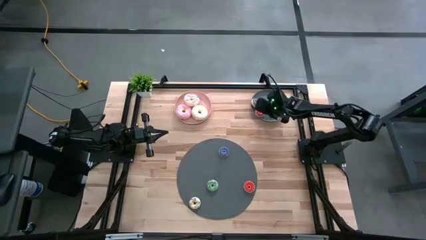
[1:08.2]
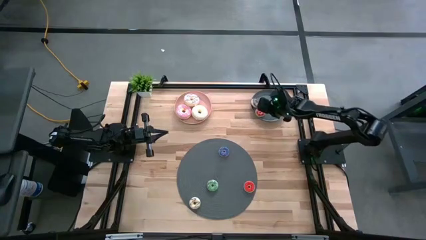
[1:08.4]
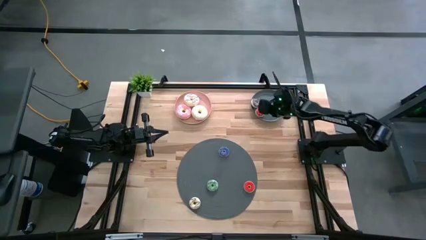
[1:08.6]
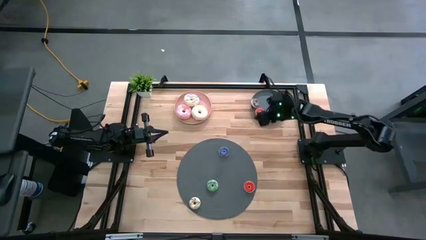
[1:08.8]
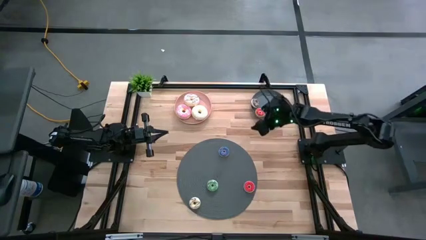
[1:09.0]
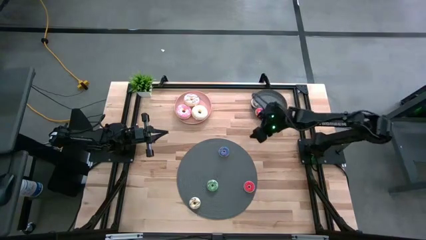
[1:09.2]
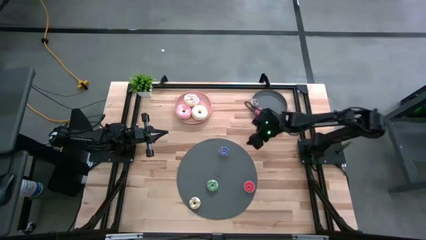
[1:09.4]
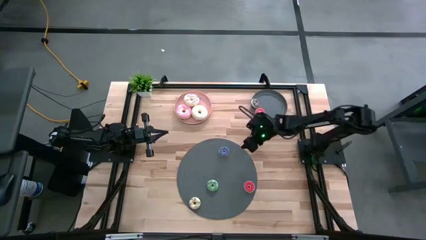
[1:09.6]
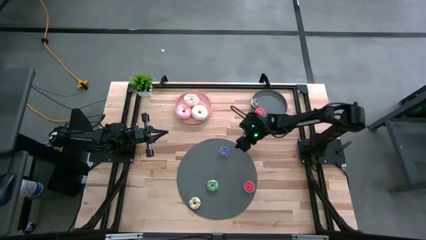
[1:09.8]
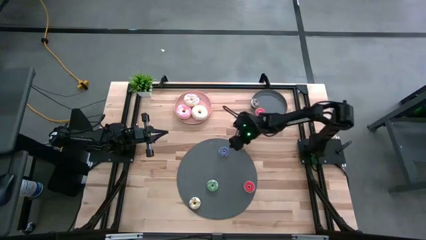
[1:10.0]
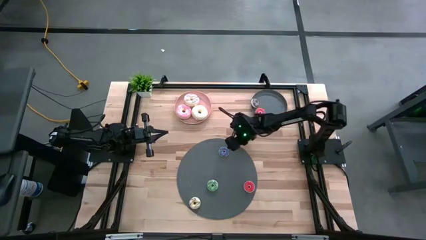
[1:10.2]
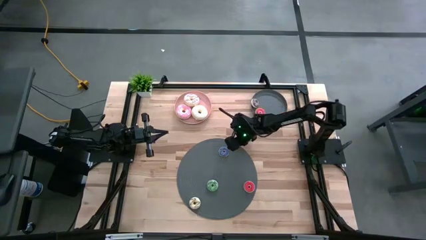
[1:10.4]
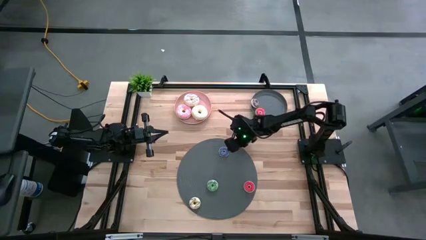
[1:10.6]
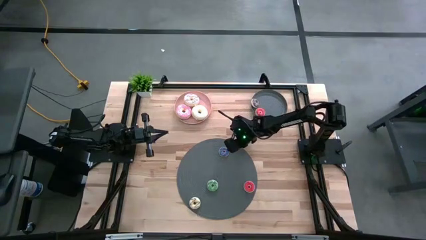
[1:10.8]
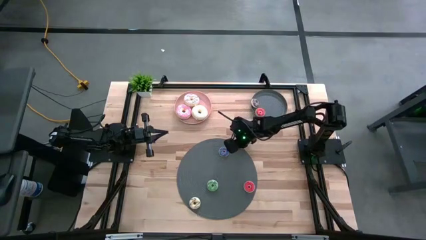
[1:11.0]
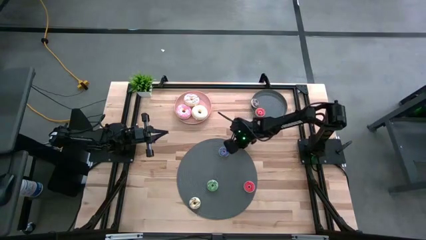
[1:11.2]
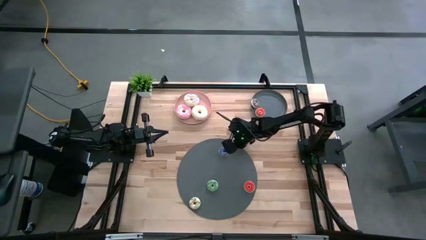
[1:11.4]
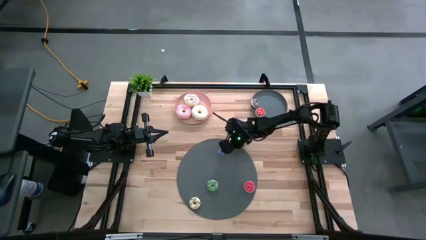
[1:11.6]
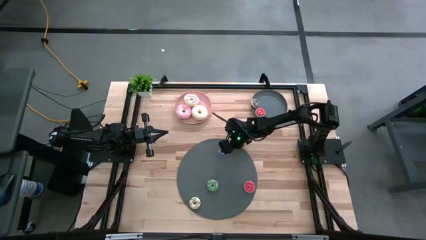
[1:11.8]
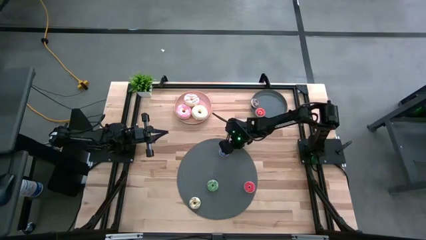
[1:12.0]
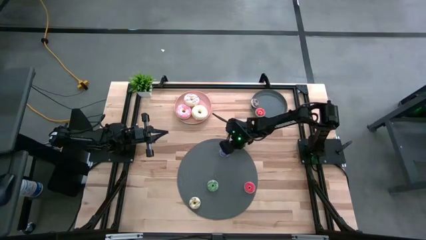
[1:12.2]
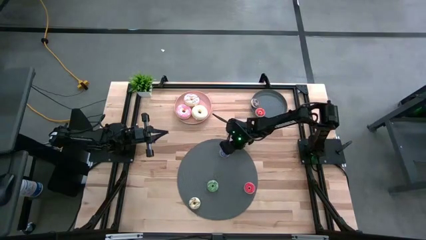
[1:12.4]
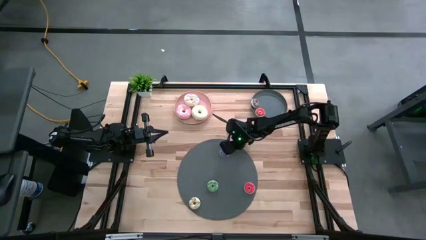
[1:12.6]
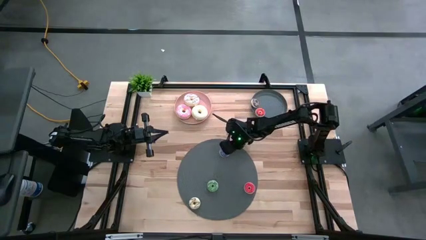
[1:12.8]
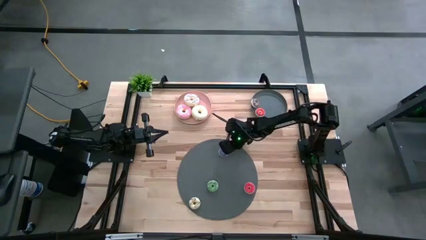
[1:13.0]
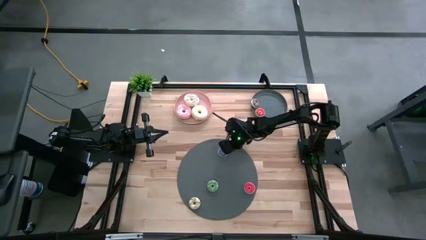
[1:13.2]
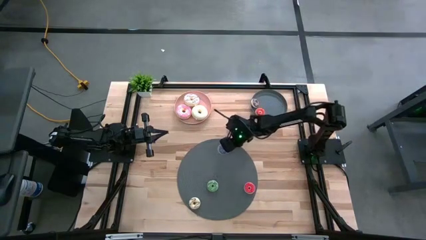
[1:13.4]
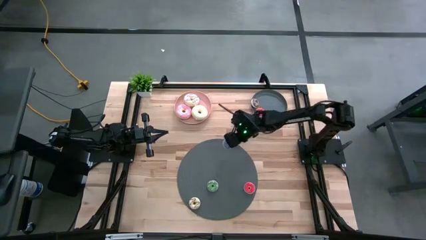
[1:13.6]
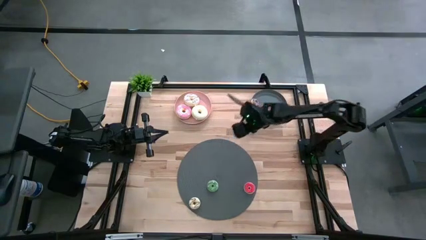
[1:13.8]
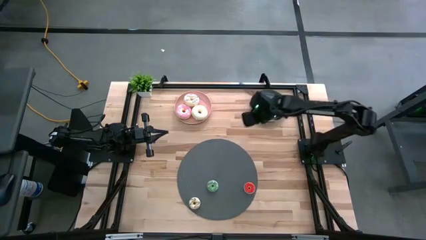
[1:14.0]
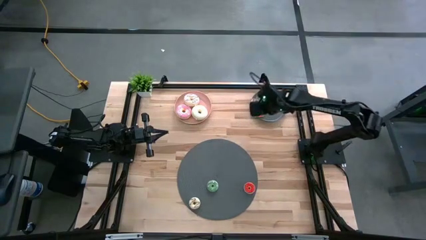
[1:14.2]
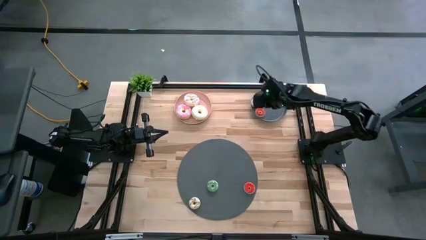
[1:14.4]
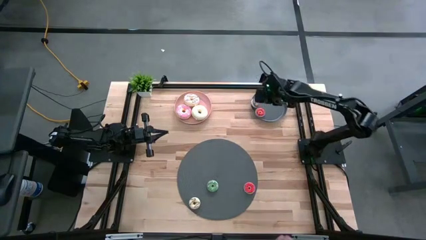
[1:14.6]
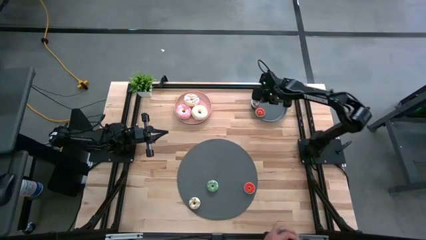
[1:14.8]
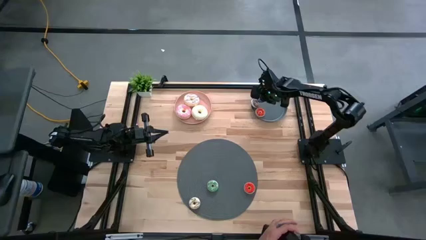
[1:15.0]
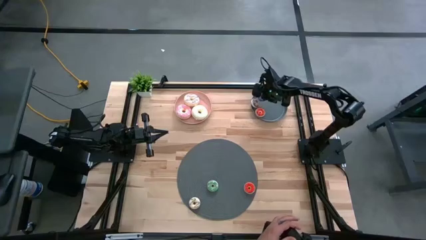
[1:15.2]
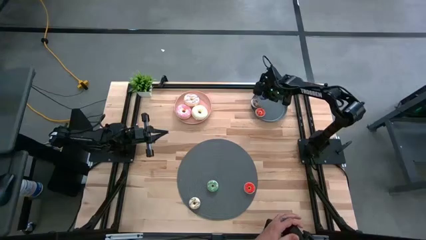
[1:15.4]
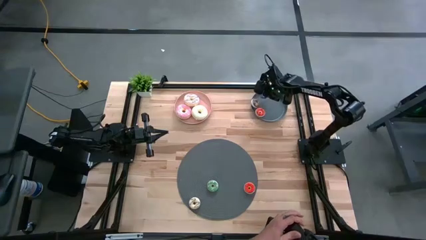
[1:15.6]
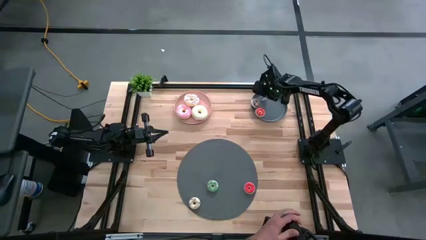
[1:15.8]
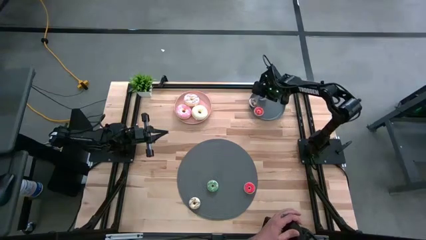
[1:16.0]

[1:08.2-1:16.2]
Task: Pick & Place donuts
Put the small blue donut on the gray plate

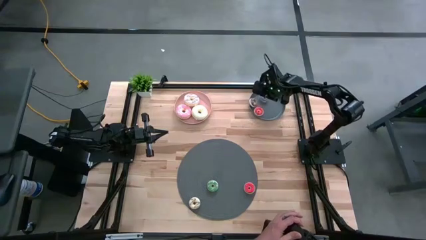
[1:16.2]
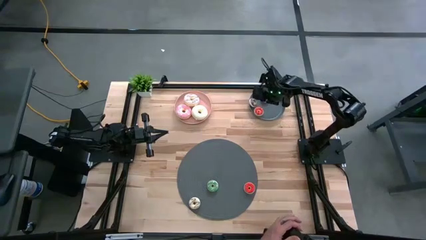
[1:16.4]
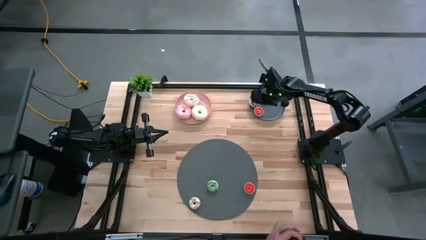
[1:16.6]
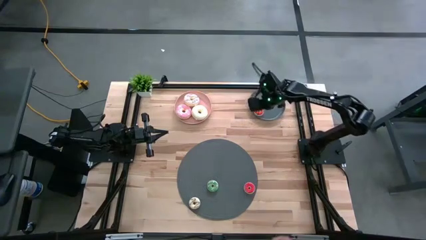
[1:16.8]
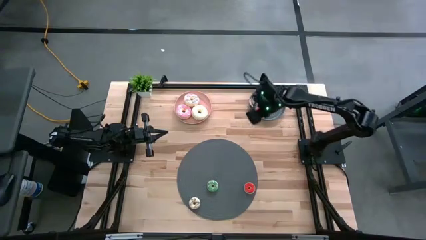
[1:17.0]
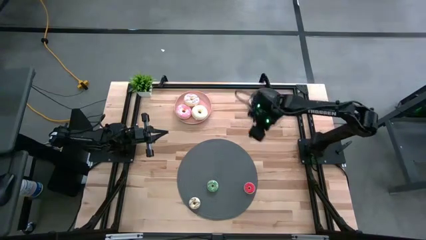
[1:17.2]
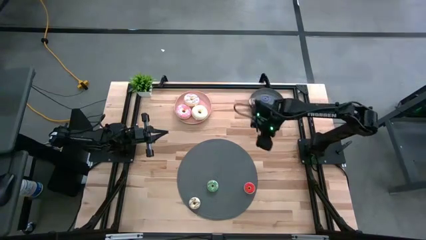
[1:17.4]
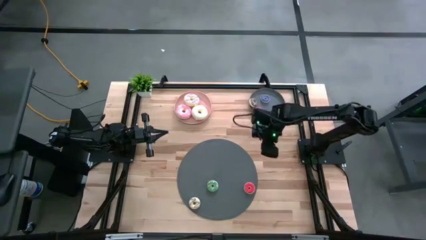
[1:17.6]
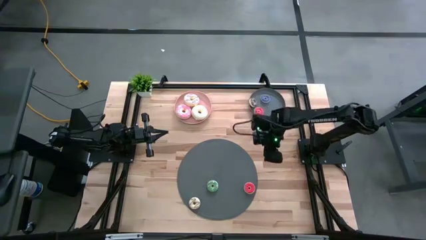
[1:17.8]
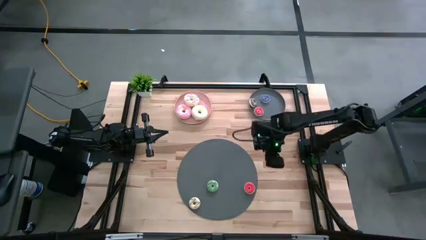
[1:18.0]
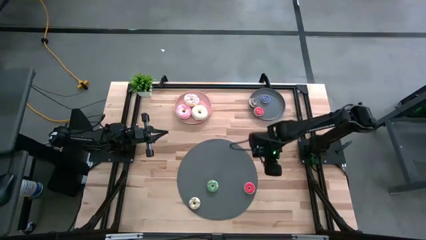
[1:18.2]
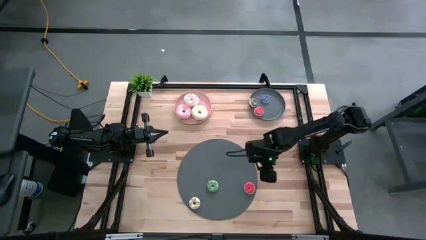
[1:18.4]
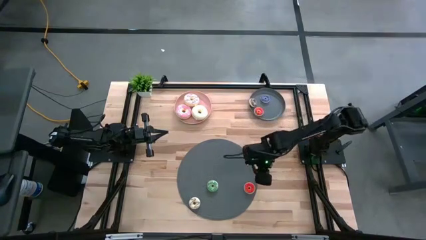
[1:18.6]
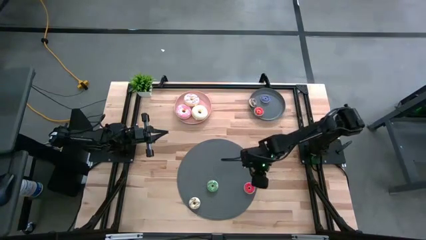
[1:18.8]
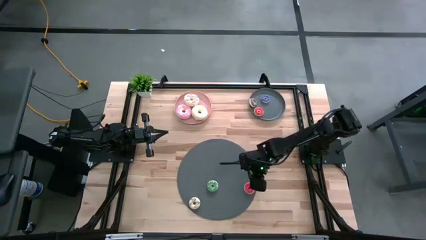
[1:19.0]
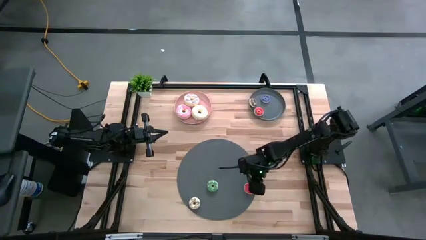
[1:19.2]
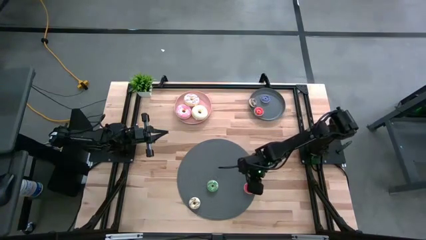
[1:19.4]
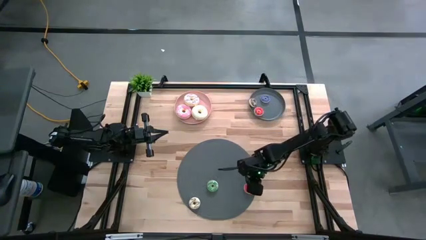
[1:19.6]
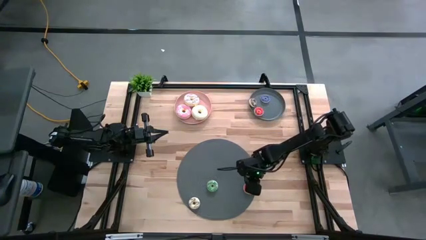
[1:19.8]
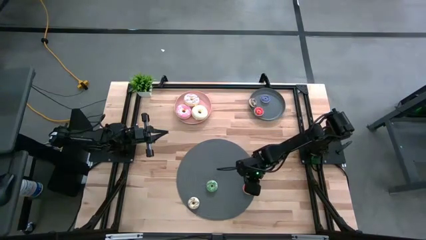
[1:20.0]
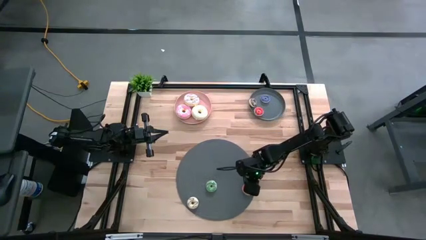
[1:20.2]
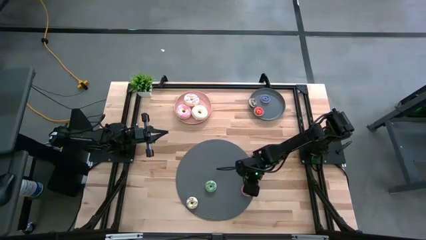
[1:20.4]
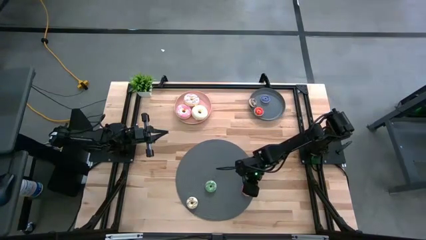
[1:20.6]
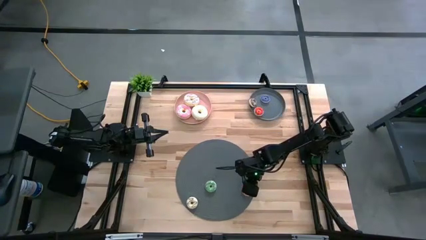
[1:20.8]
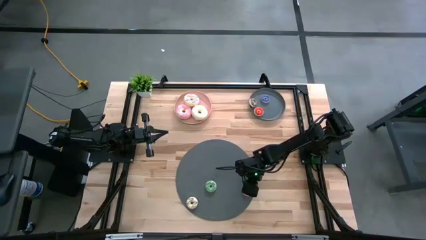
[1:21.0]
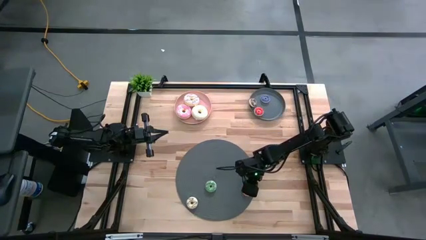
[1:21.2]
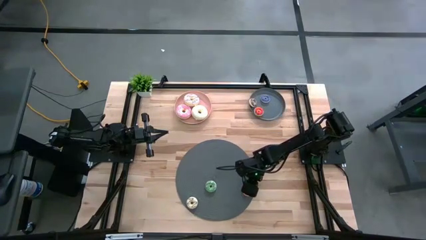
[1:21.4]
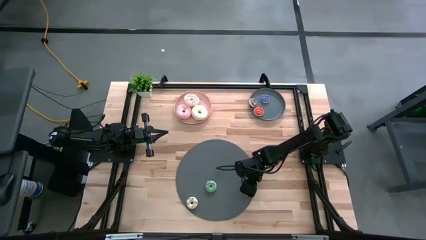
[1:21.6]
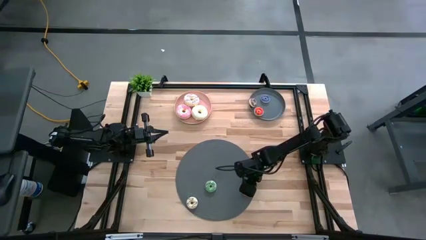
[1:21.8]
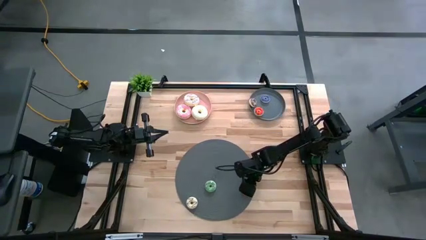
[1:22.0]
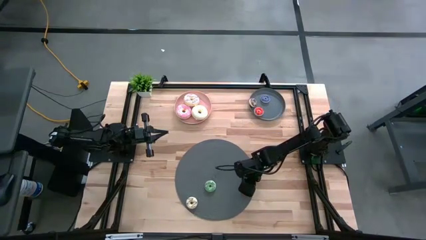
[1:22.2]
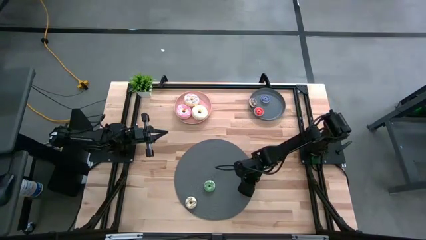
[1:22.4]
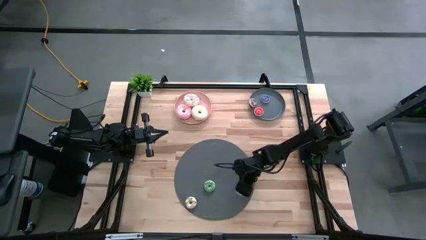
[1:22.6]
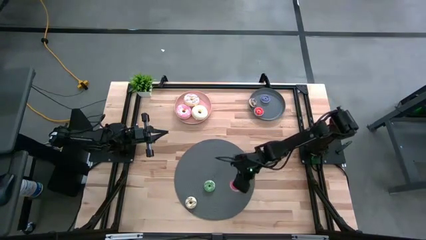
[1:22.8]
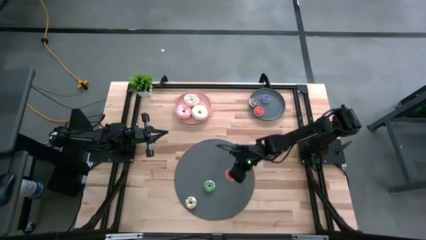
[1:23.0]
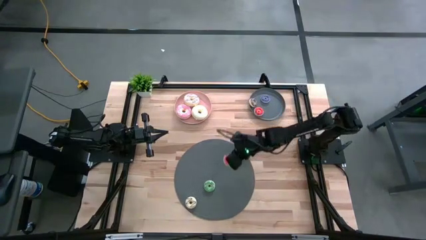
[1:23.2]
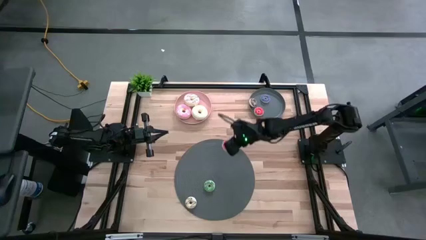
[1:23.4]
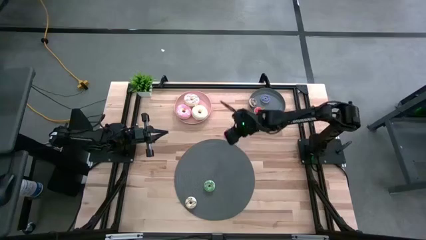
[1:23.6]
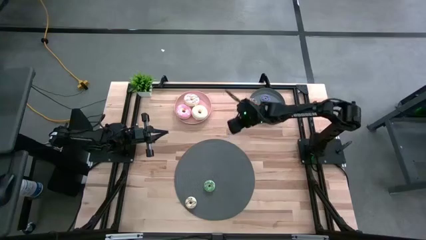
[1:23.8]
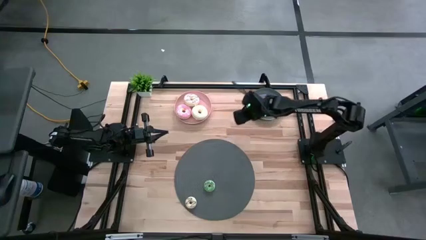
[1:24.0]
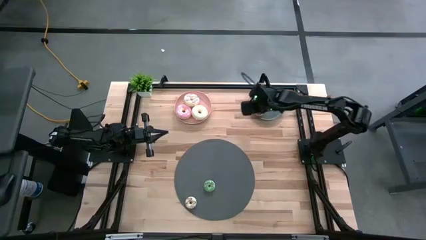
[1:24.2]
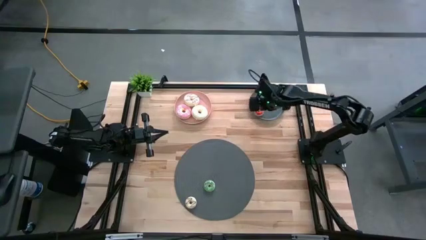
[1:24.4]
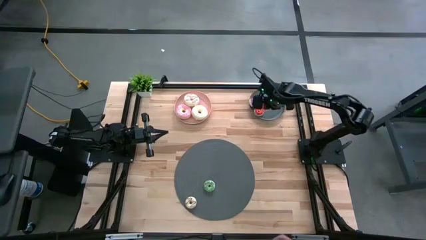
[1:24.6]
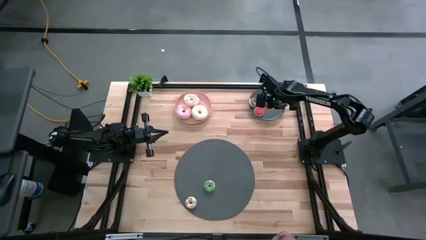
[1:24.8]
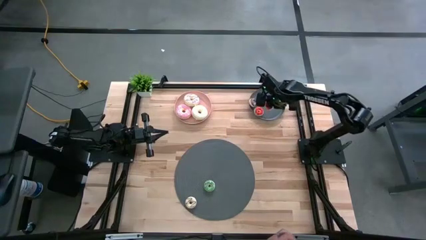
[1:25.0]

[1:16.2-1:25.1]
Put the small orange donut on the gray plate

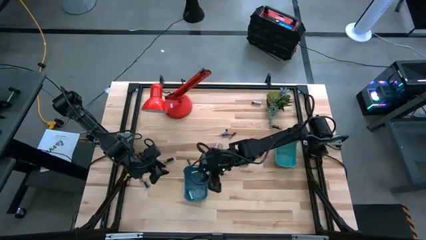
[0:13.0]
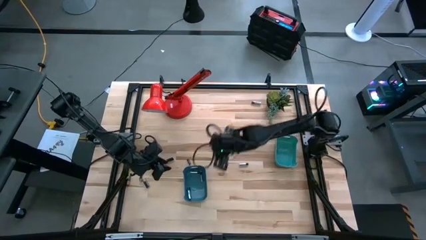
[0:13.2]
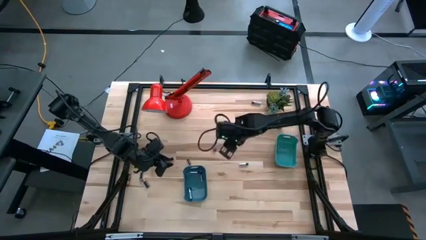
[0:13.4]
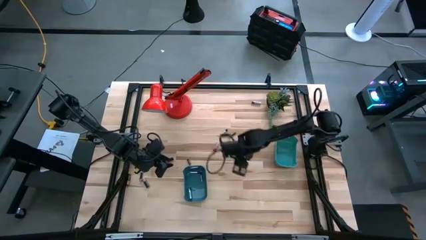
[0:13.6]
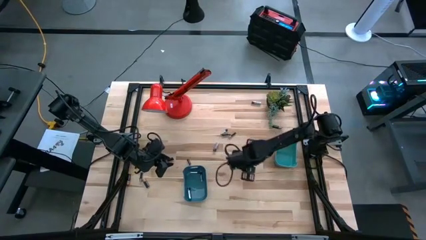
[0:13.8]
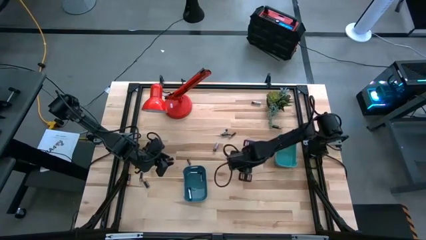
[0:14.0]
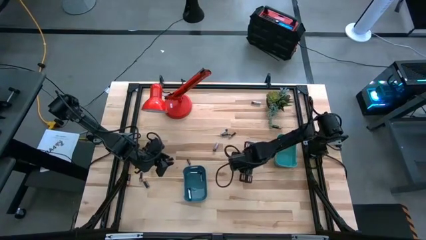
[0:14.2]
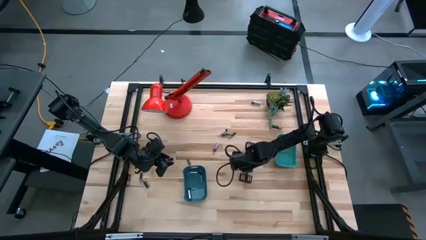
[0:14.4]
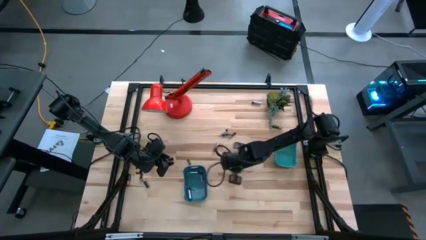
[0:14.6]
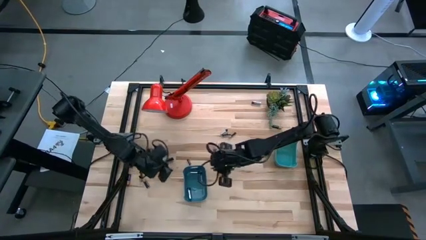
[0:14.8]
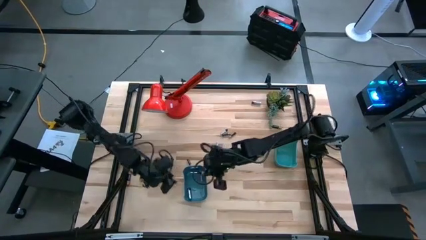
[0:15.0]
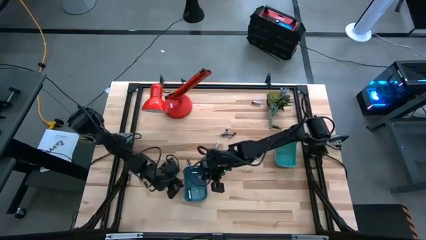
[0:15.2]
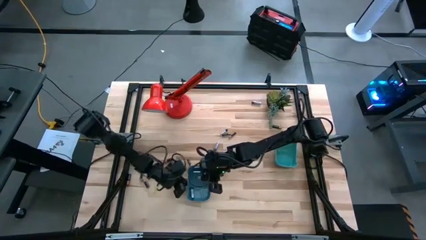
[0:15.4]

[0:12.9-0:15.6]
Task: Sort batteries
Put the silver battery into the blue bin
